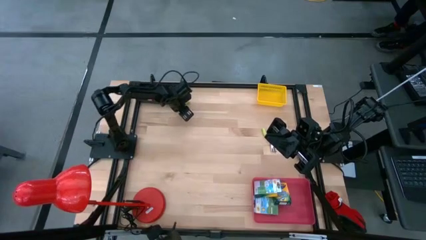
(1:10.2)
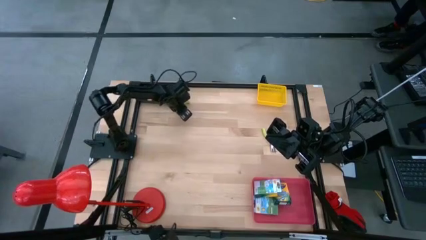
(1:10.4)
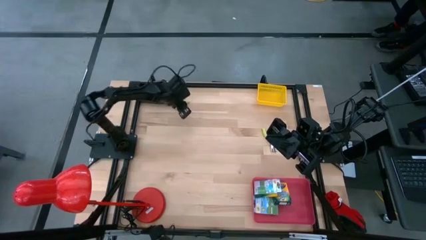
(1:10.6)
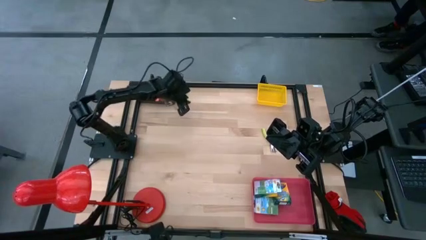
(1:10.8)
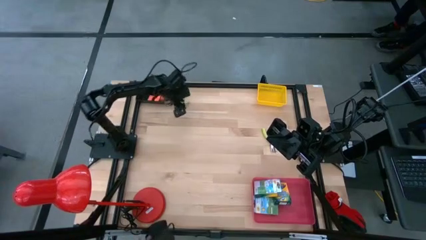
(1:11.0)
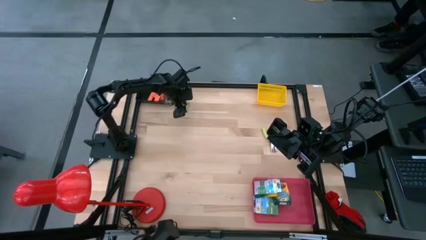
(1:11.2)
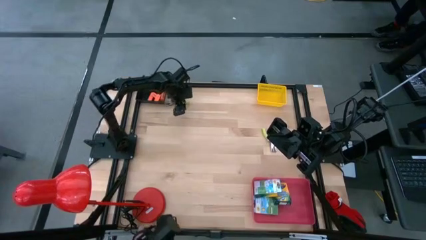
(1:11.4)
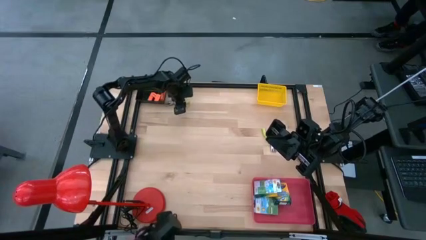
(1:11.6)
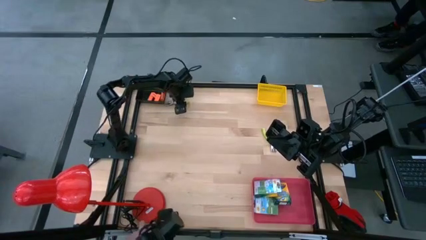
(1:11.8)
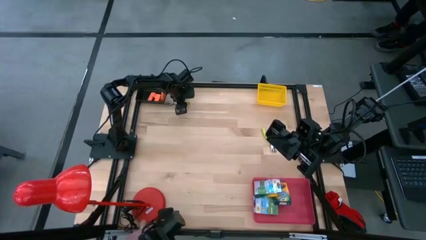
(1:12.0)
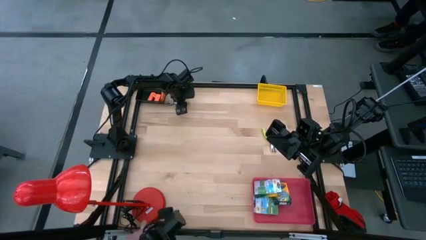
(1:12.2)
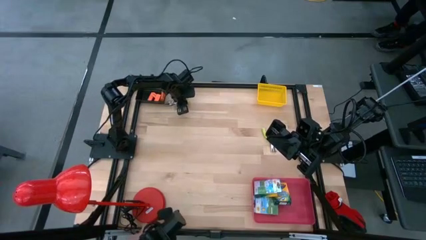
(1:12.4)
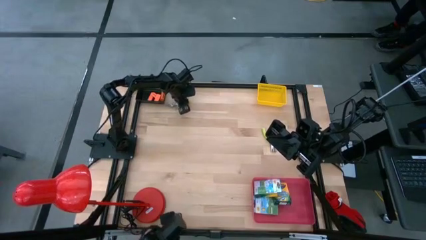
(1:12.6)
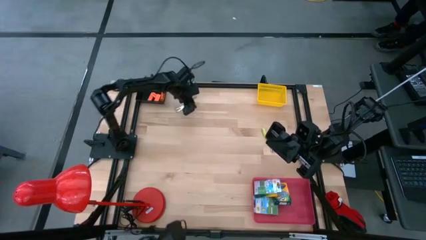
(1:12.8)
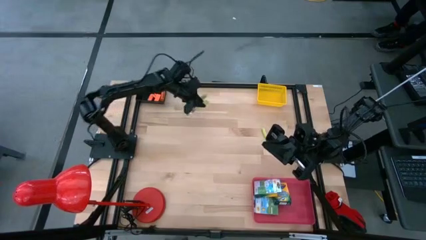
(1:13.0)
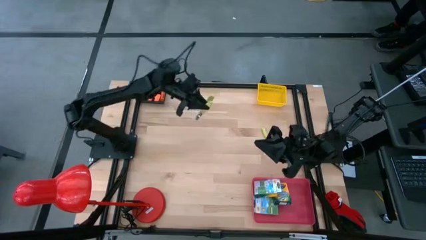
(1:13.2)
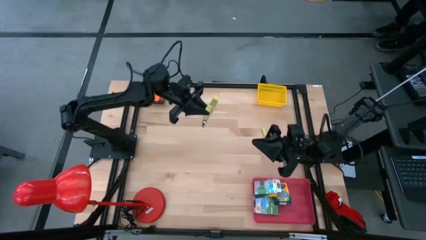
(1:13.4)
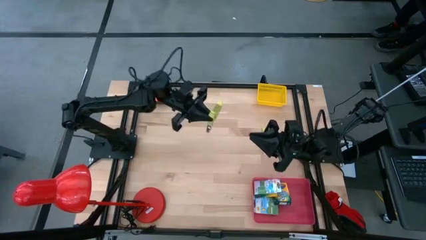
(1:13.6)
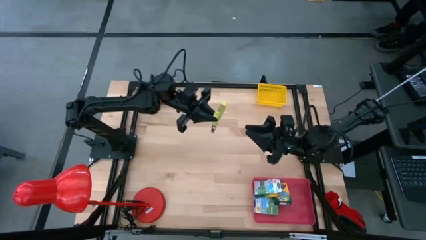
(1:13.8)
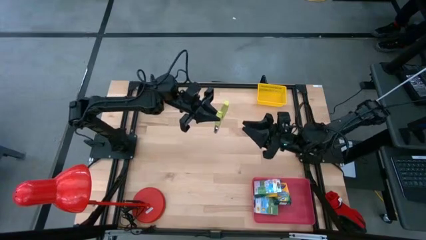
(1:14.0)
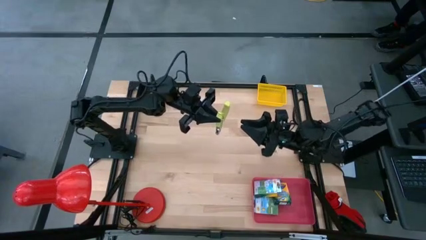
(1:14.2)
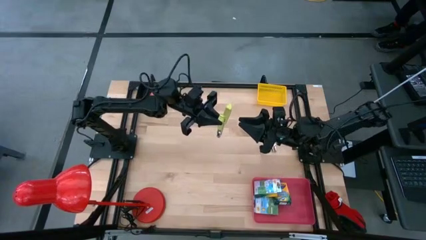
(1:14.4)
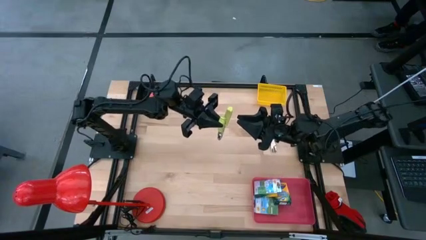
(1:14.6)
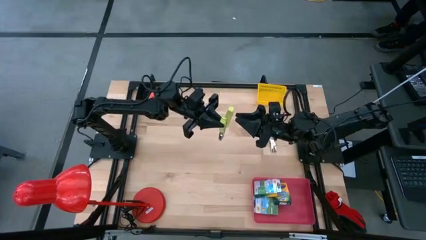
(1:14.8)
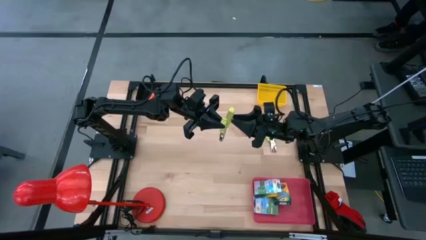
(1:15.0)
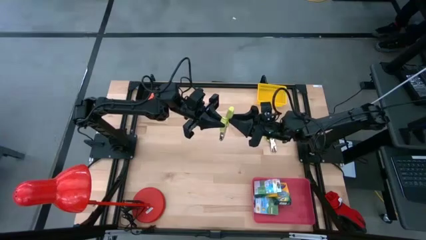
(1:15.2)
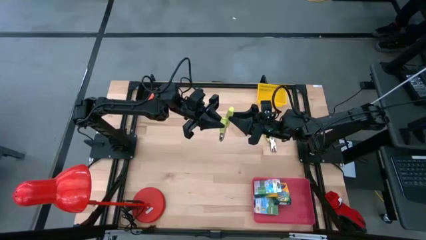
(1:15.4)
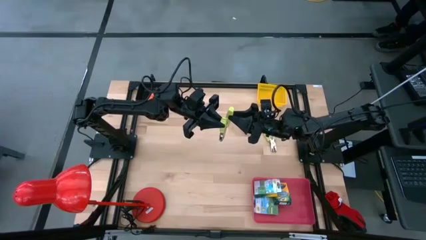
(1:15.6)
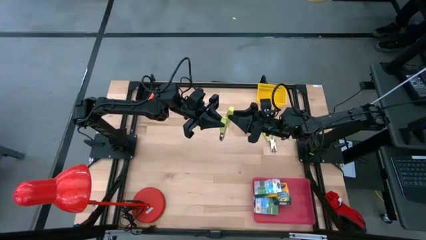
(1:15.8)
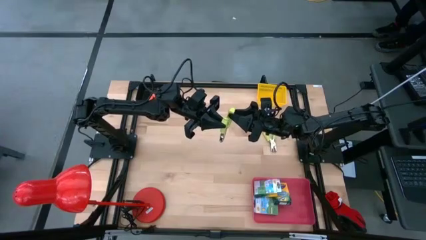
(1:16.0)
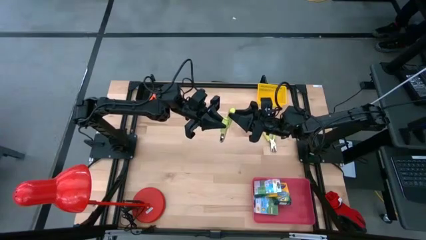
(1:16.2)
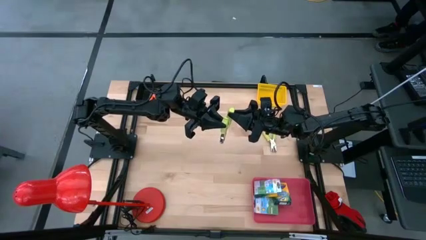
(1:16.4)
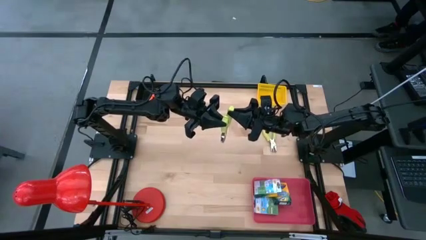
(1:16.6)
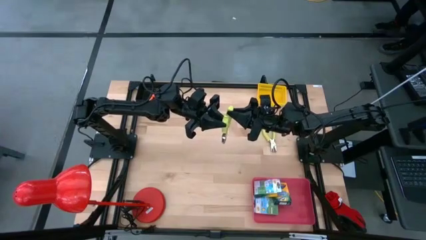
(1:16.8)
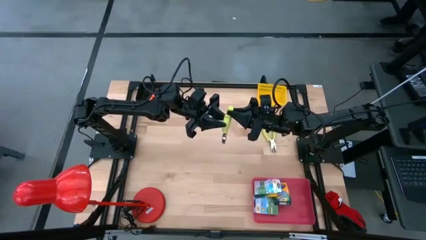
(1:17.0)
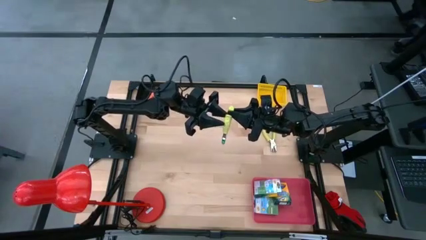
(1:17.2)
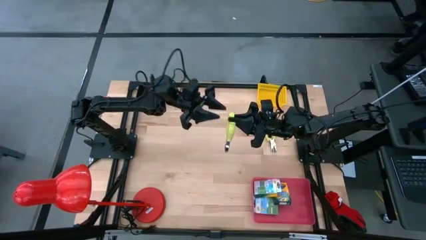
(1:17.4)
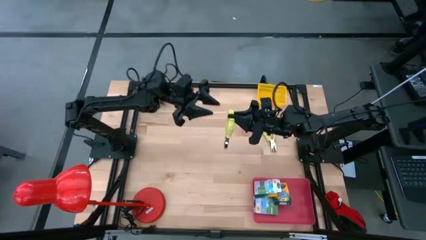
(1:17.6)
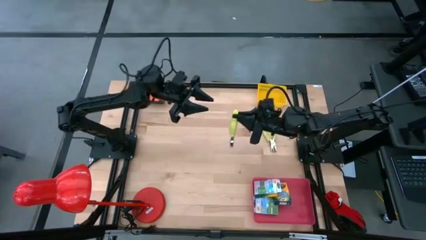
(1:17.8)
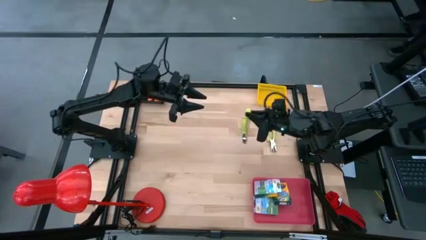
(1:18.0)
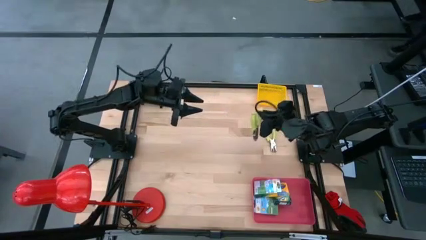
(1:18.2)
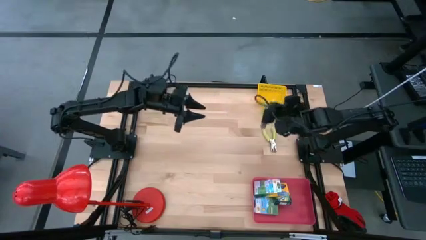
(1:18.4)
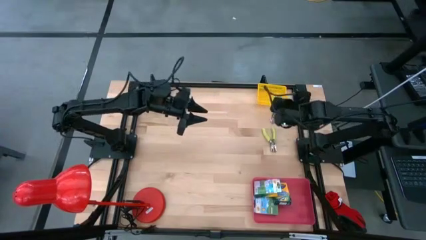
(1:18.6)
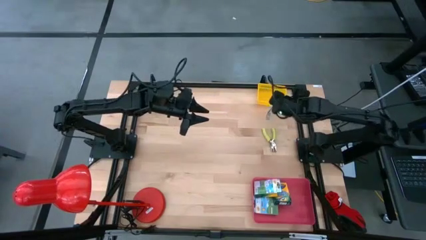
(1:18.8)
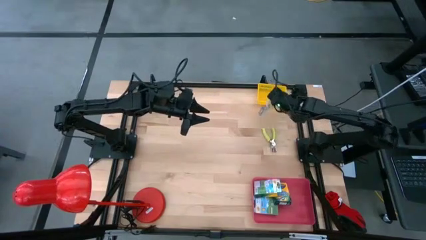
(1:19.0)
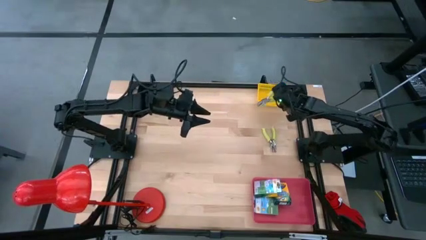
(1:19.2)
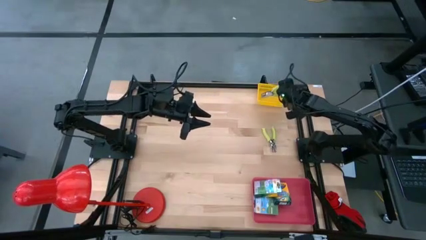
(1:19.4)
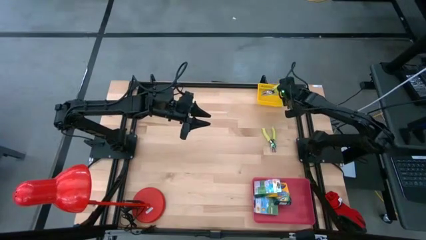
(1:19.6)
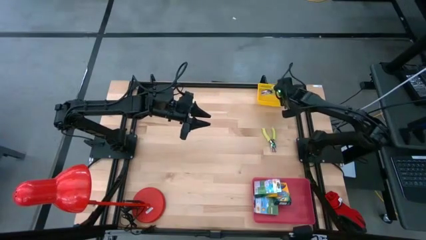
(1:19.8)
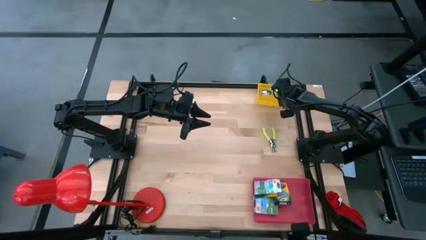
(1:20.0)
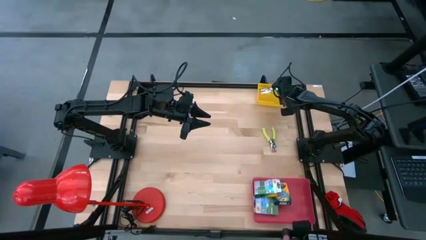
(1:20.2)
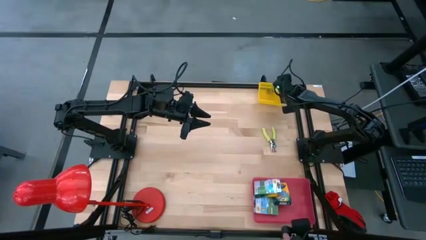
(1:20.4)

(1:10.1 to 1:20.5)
Task: Pick & Place School Supplies
Put the green puncher into the yellow bin

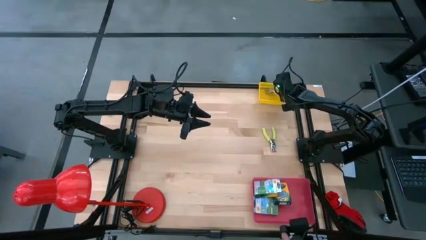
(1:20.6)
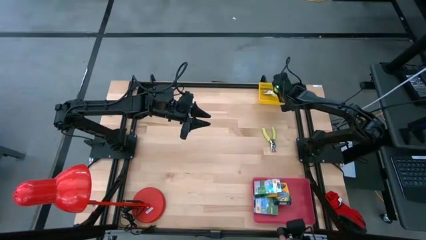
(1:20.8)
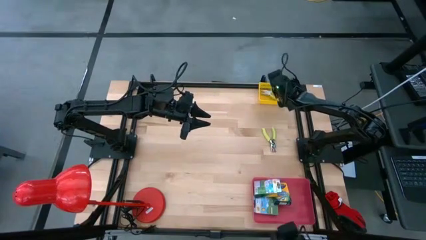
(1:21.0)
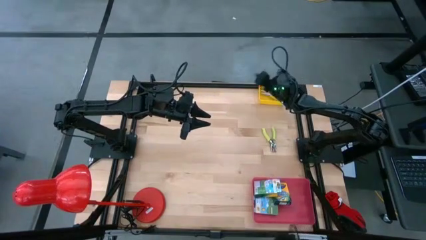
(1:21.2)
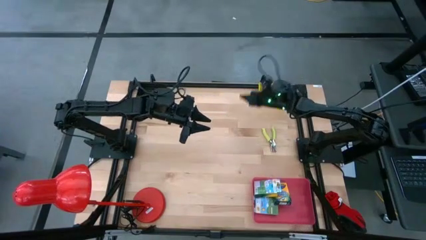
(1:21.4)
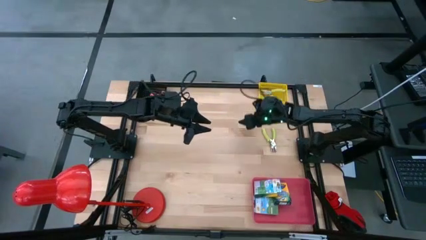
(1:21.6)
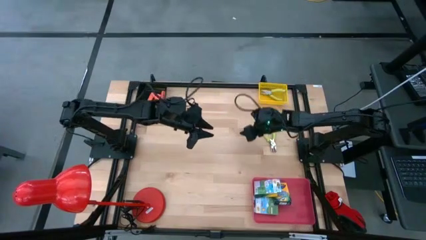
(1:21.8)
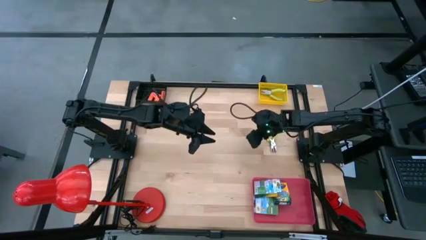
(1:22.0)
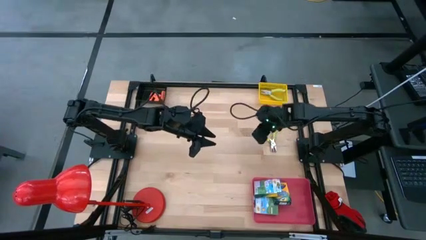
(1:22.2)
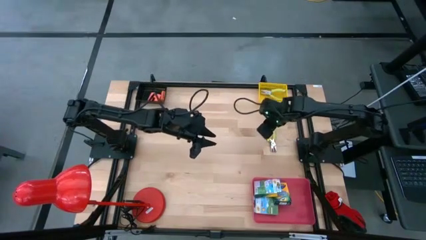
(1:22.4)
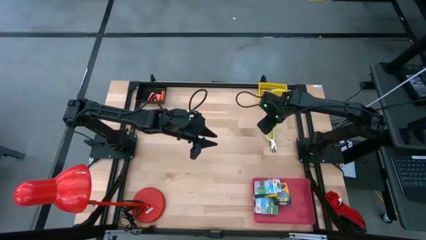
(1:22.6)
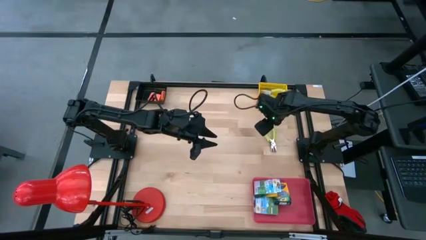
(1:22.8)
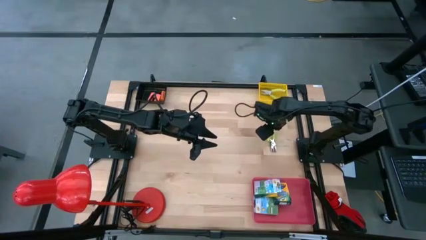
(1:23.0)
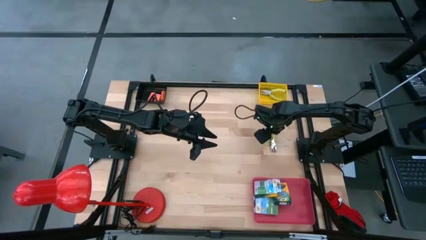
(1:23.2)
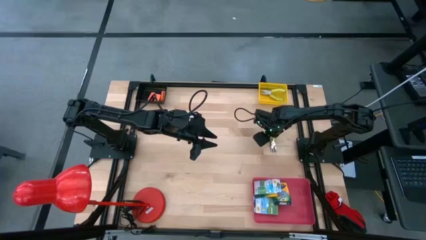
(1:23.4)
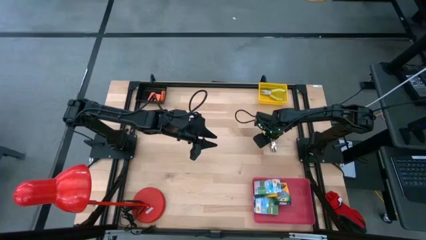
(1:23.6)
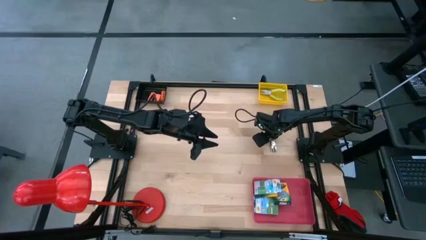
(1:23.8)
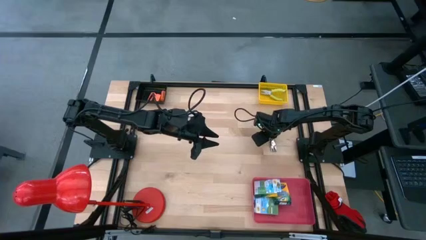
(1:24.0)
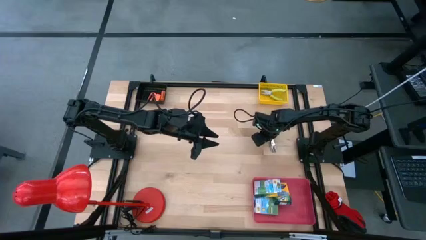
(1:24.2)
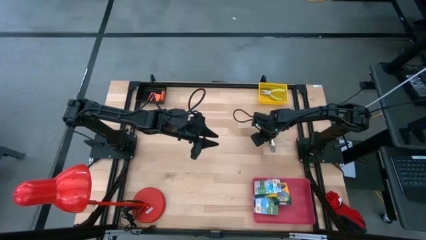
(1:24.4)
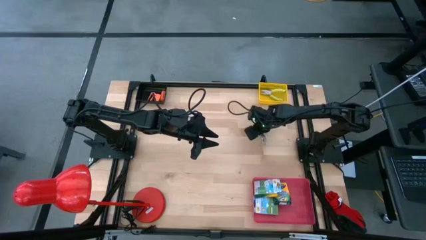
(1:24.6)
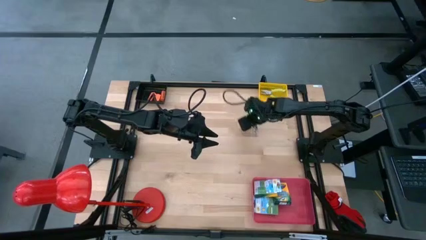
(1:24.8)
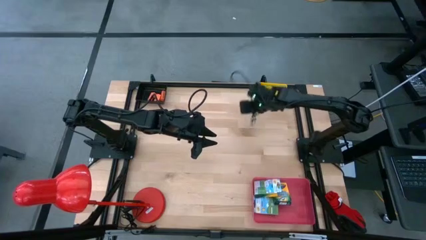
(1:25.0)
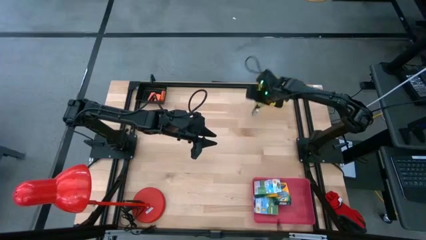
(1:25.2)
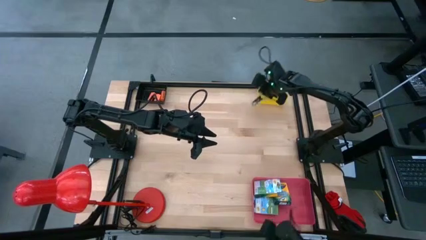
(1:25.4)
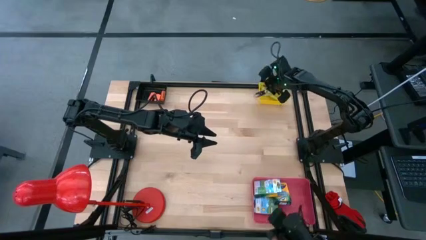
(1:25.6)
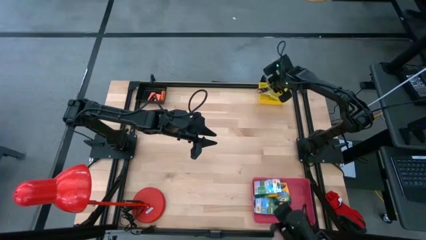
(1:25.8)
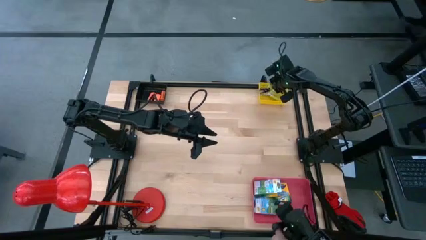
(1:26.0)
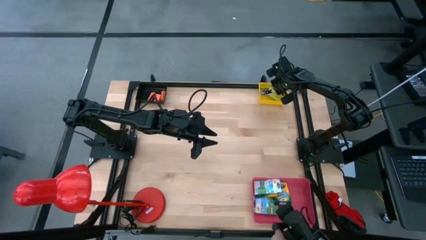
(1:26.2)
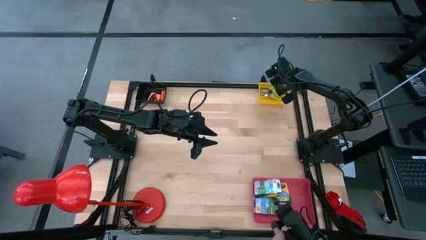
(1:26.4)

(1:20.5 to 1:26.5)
Put the green puncher into the yellow bin
